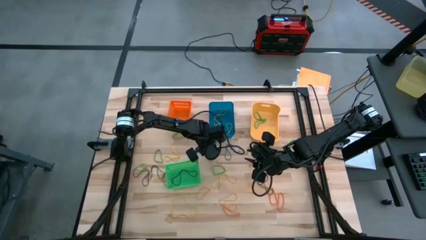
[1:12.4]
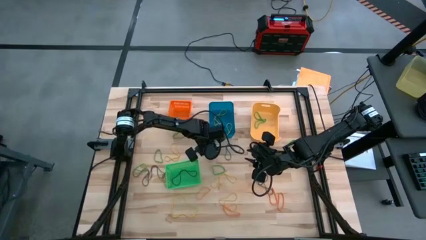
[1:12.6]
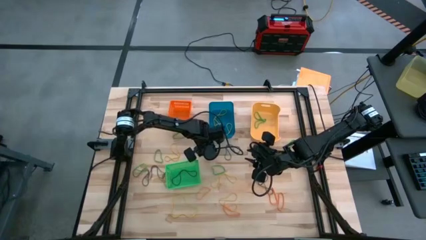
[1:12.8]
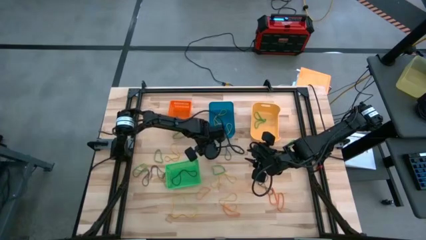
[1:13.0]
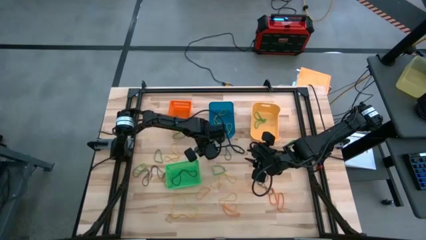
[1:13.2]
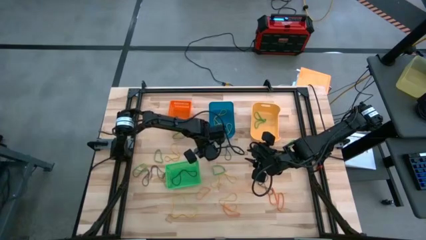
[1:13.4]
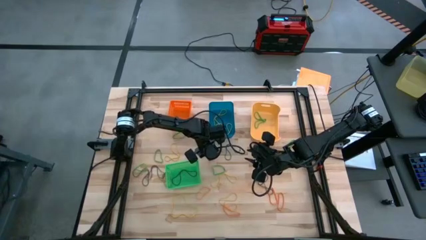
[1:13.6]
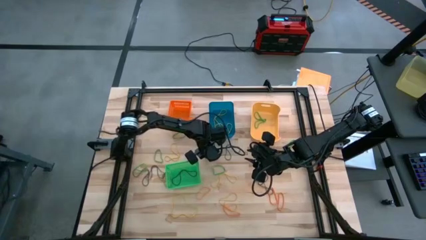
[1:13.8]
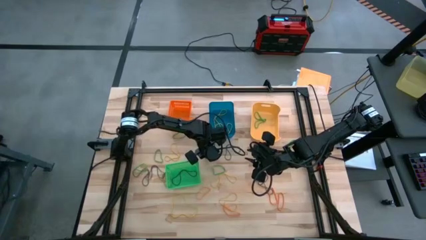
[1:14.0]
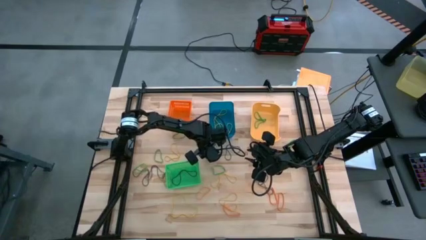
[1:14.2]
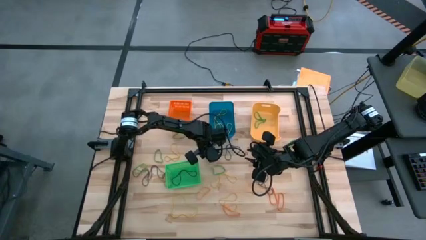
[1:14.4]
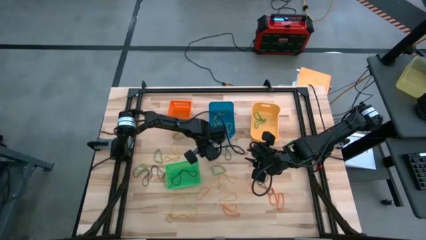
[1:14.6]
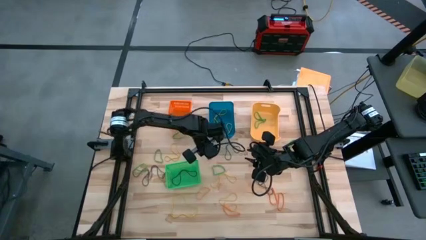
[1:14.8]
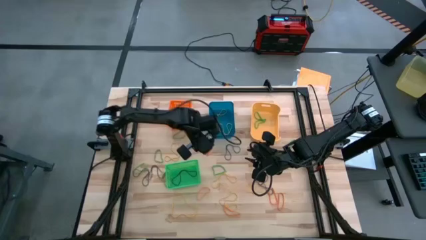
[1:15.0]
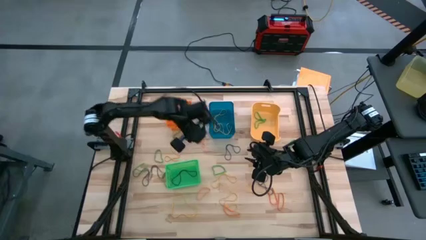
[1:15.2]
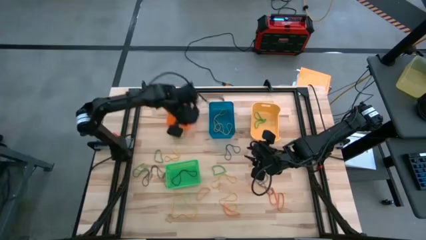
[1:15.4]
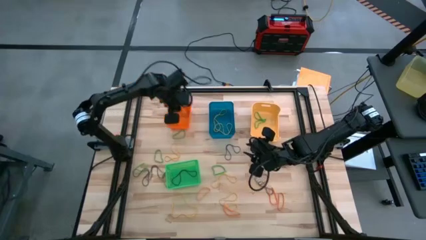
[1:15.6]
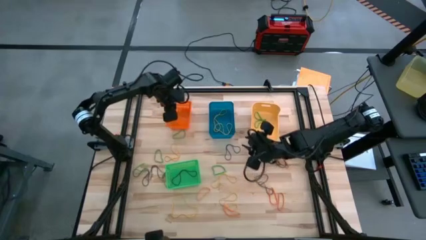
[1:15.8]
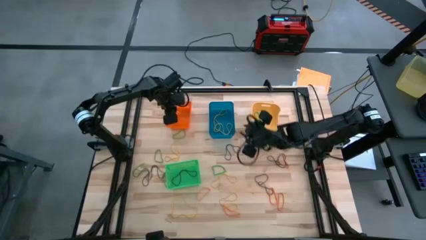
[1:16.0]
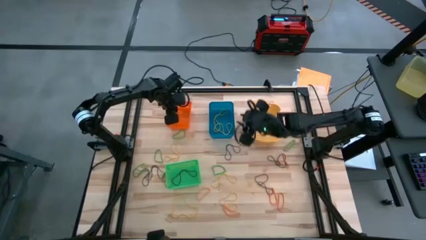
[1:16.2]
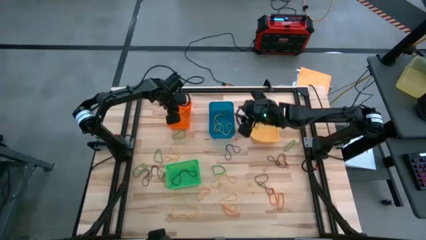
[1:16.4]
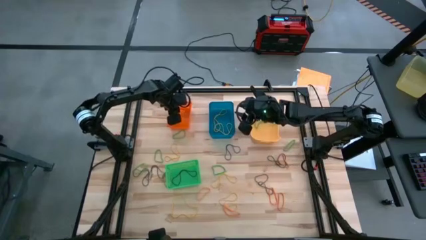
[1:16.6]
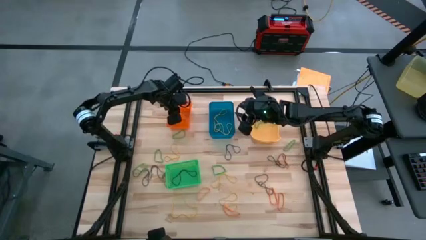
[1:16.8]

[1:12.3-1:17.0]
Task: Sort rubber bands into baskets
Put the orange rubberband into the orange bin

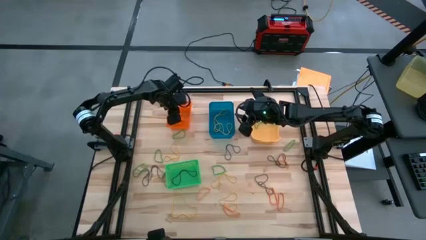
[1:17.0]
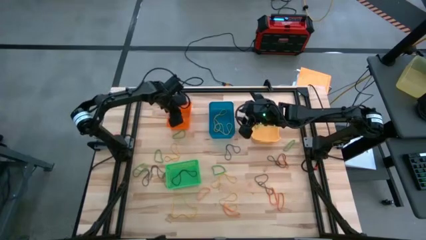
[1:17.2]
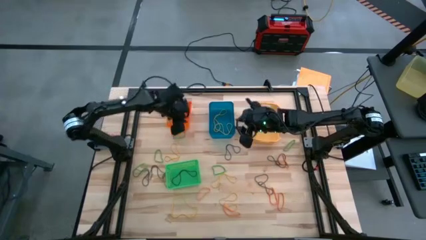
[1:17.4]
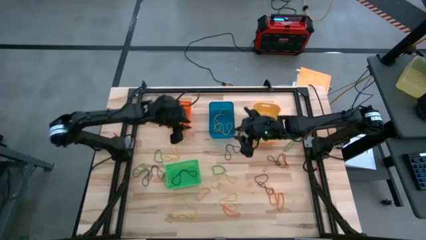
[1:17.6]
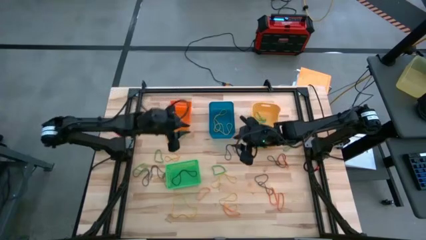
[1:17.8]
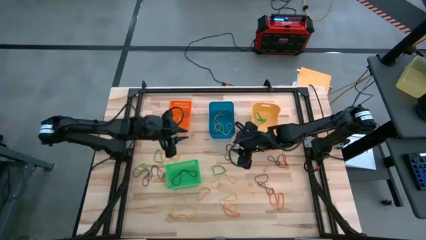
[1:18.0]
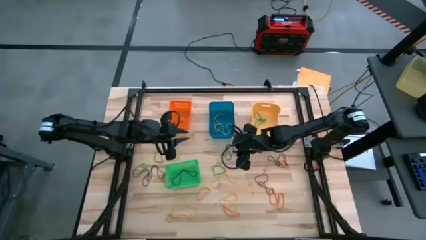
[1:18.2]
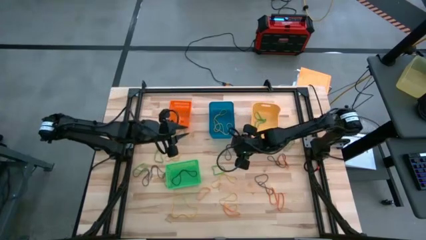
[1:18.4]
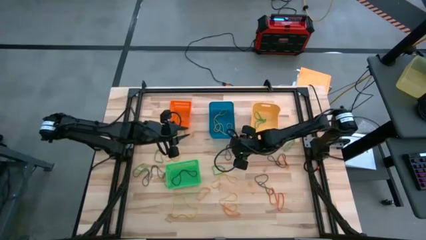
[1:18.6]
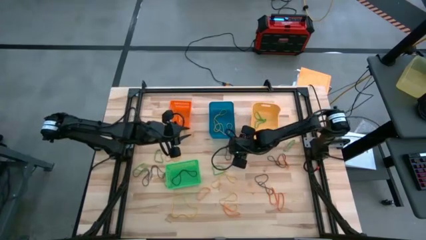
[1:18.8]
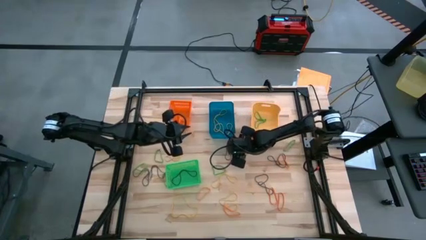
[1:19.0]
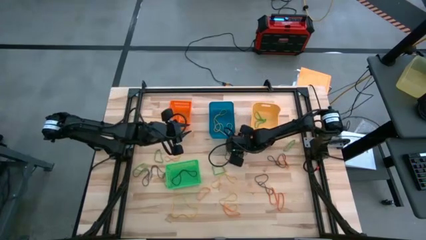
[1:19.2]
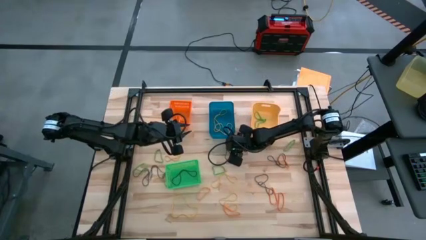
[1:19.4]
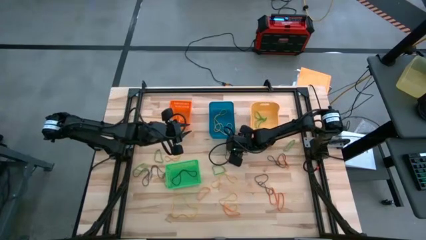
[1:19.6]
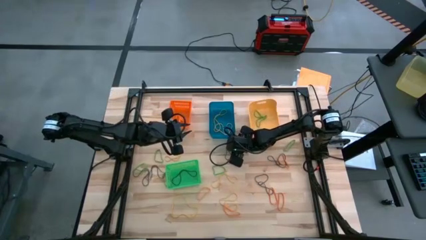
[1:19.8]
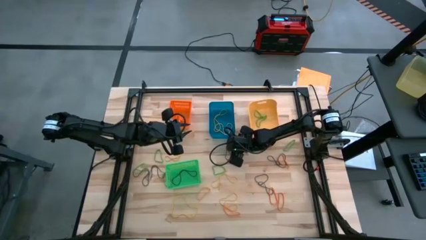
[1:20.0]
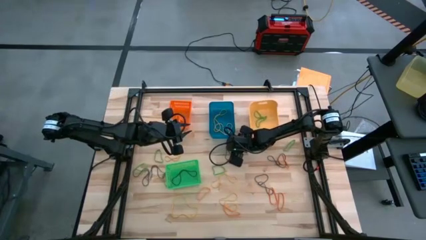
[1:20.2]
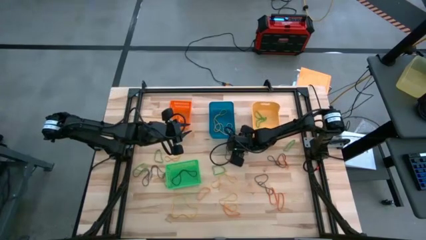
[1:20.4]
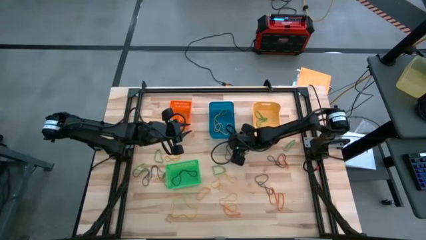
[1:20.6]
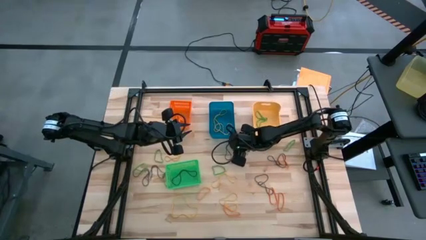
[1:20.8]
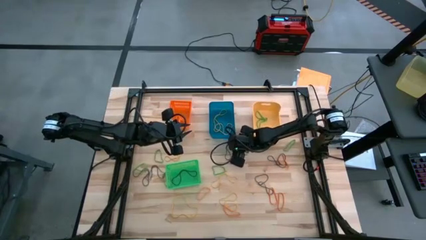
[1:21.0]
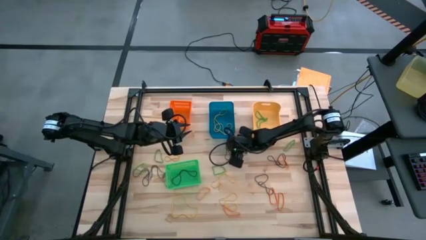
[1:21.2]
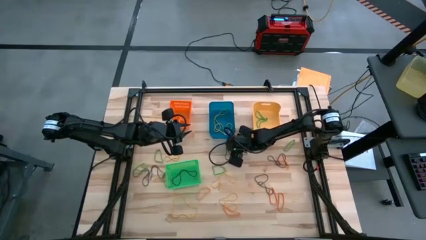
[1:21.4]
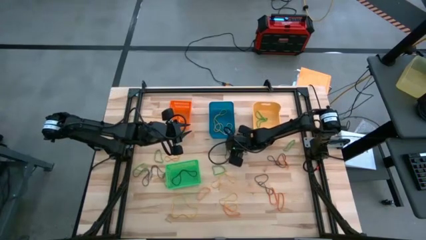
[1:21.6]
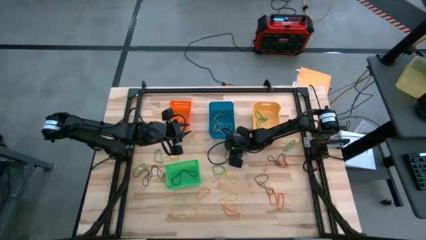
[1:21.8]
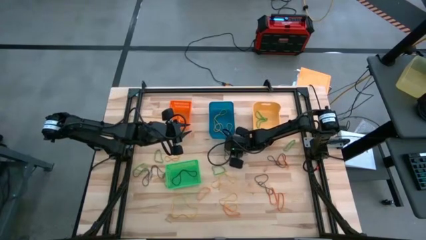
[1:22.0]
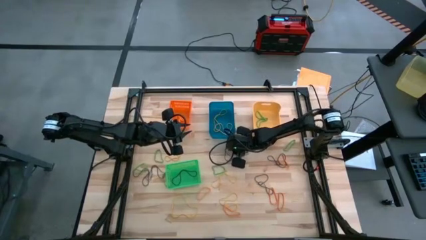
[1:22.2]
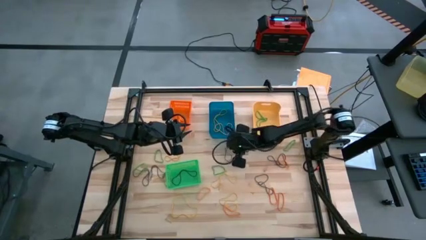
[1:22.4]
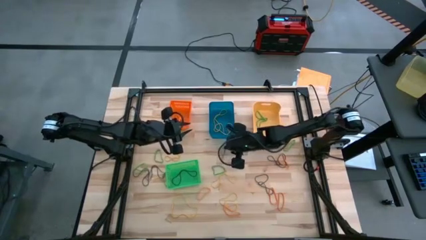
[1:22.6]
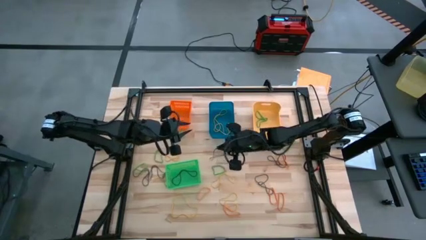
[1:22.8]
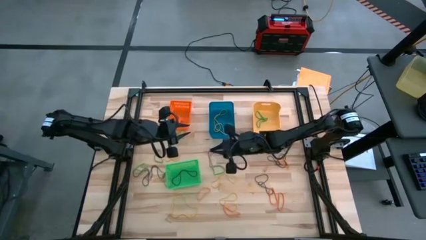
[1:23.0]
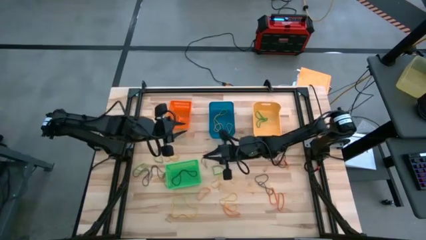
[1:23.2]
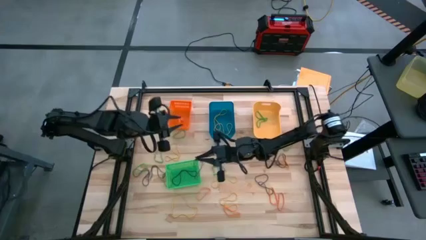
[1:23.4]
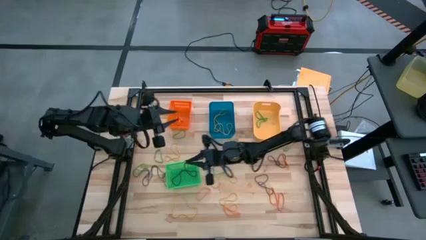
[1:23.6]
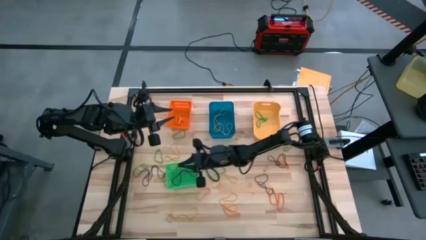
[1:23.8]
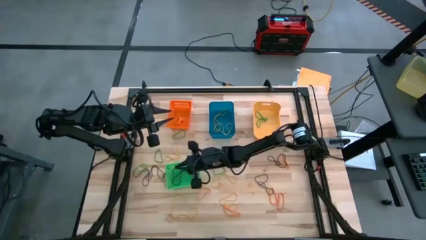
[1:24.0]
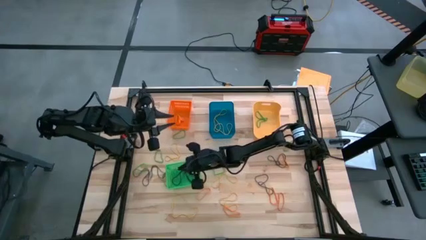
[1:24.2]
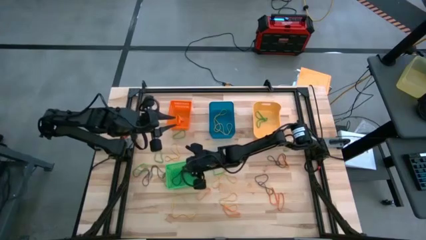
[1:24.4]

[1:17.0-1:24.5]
Put the violet rubberband into the green bin

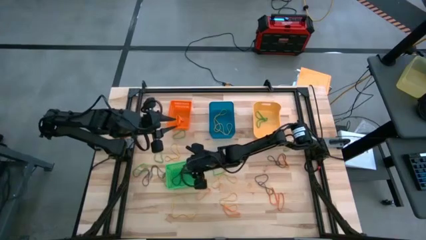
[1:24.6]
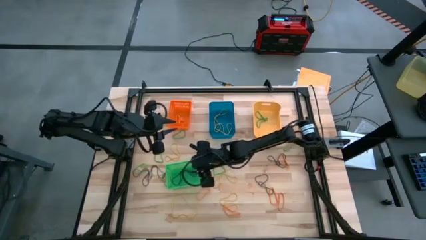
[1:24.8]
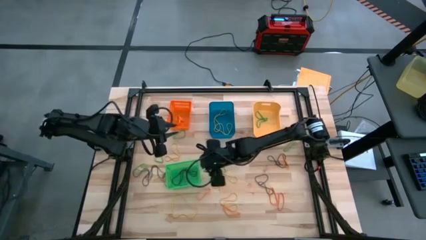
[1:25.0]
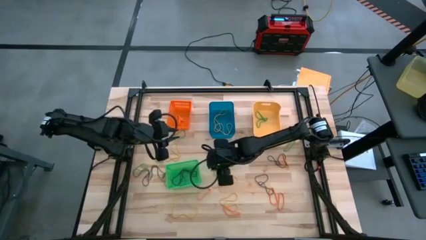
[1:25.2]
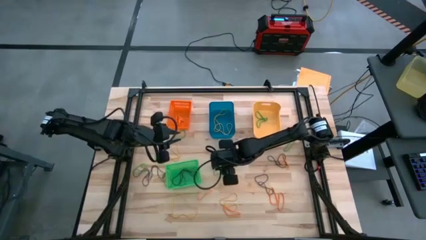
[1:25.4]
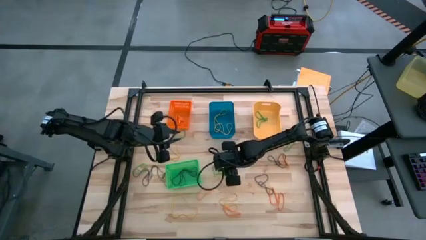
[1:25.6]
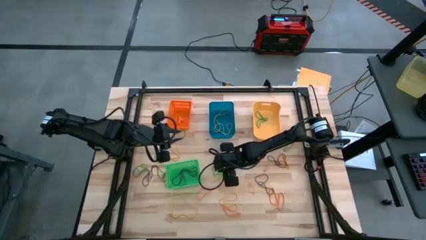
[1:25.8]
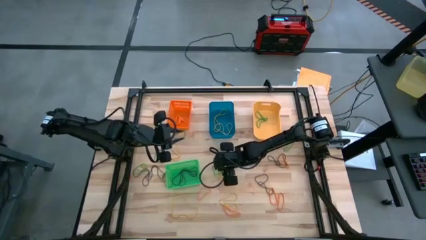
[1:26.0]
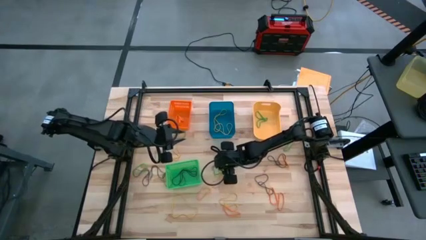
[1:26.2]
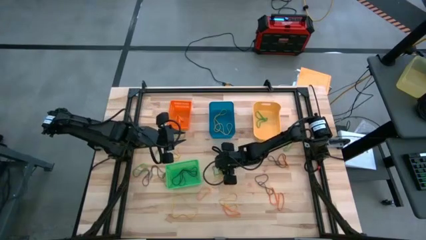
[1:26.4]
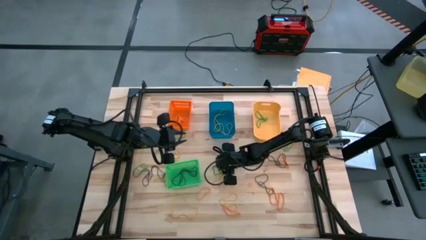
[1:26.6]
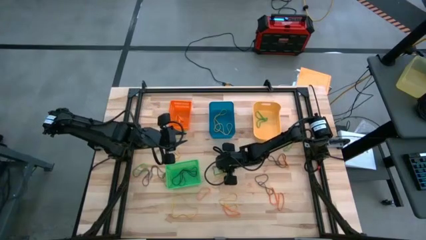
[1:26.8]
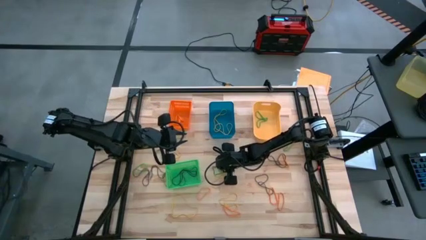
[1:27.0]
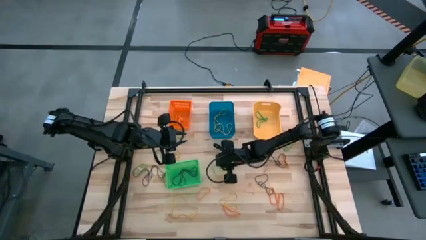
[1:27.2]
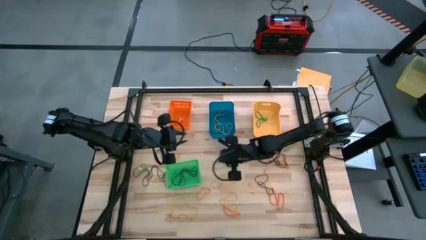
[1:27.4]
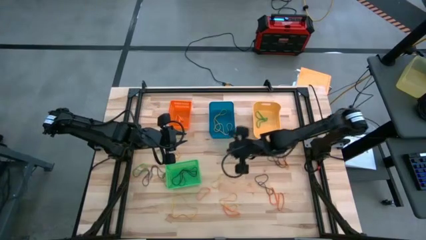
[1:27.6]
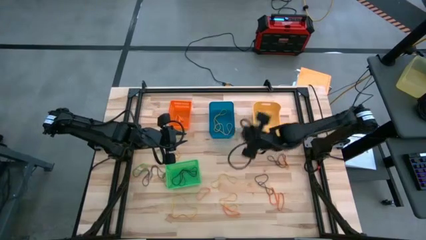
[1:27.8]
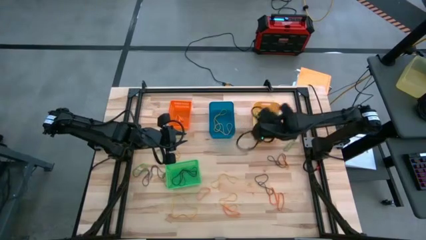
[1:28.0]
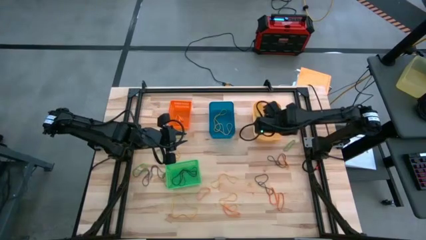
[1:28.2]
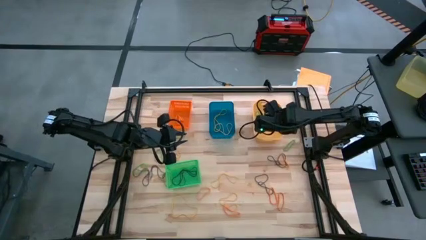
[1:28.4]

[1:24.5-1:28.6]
Put the green rubberband into the yellow bin
